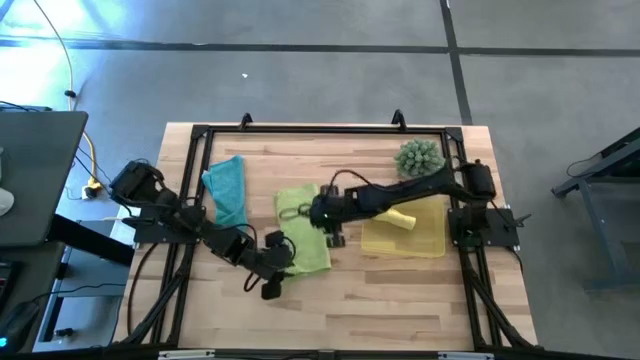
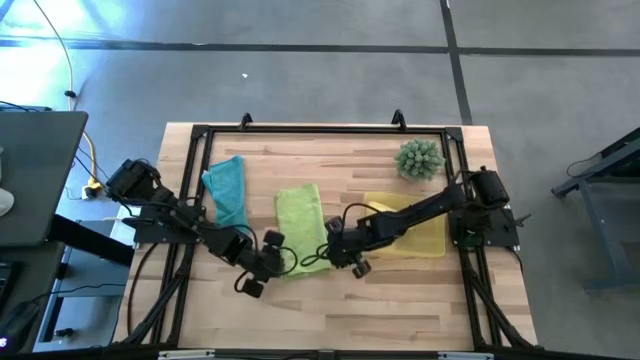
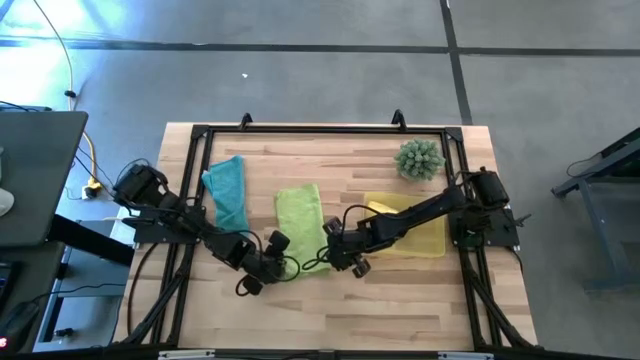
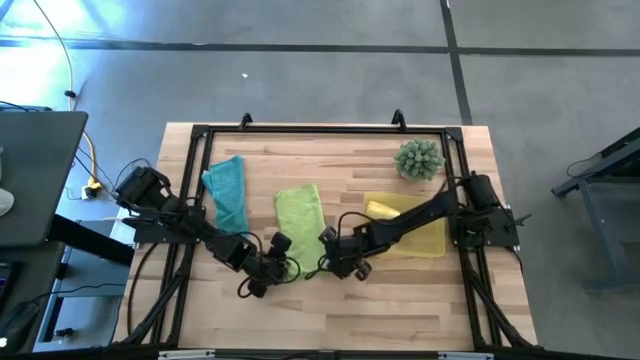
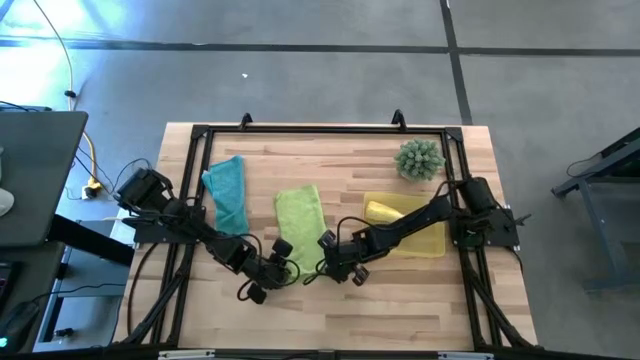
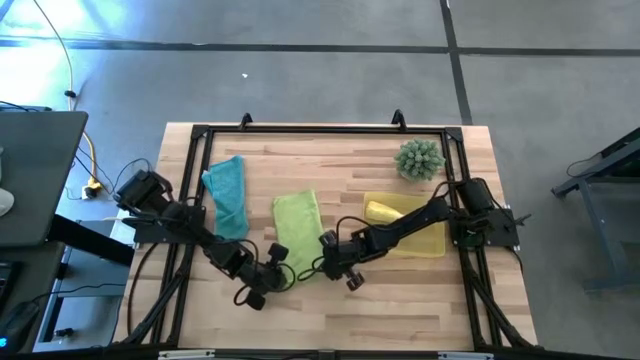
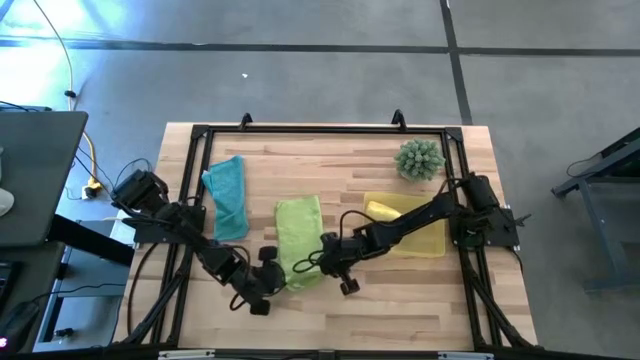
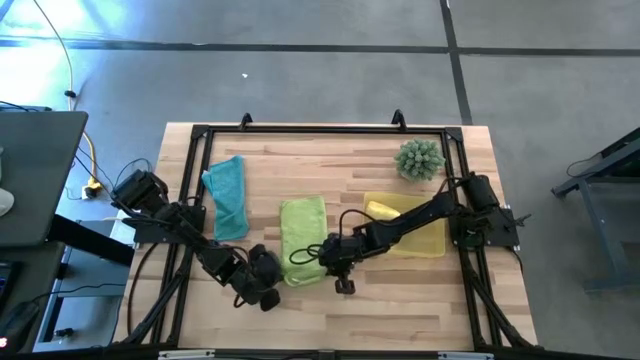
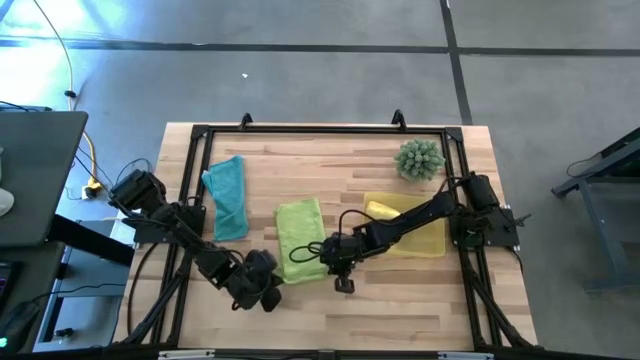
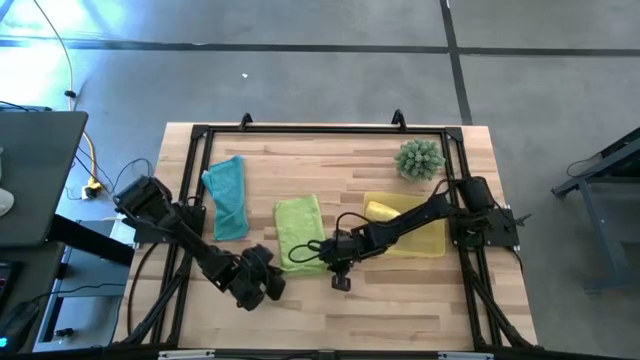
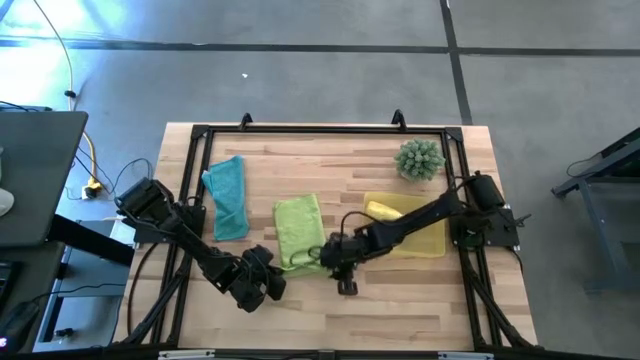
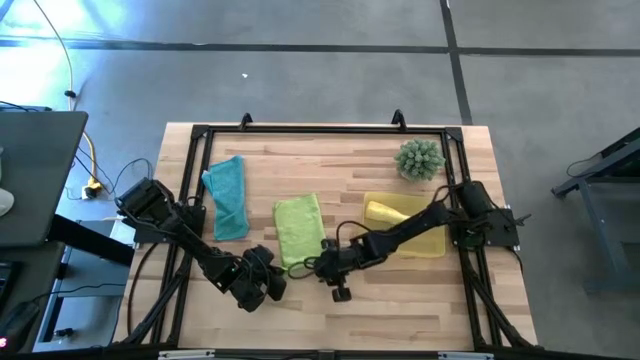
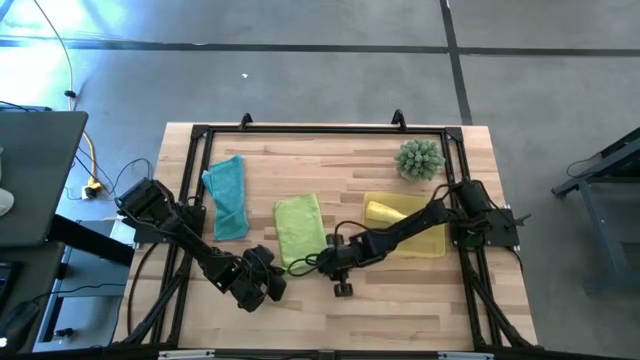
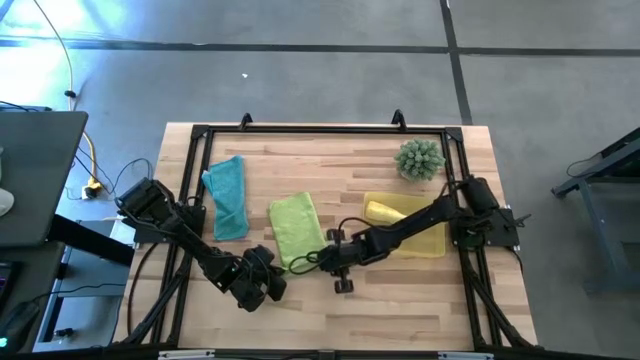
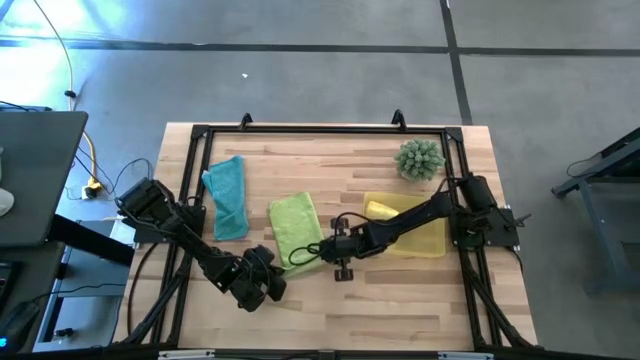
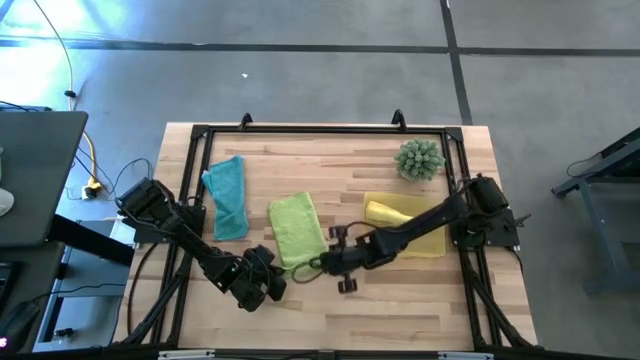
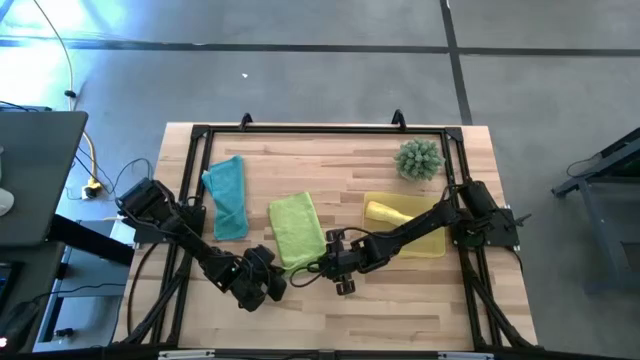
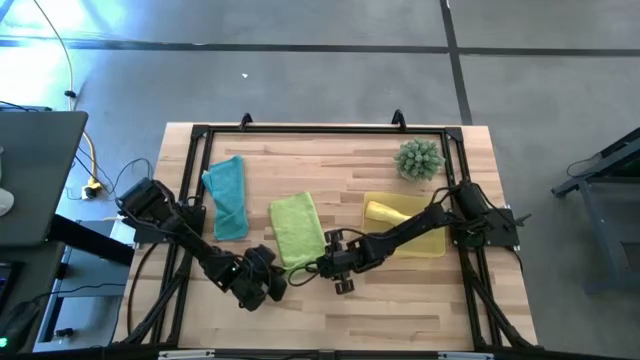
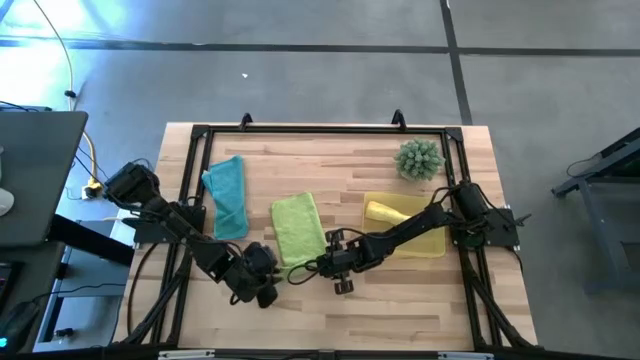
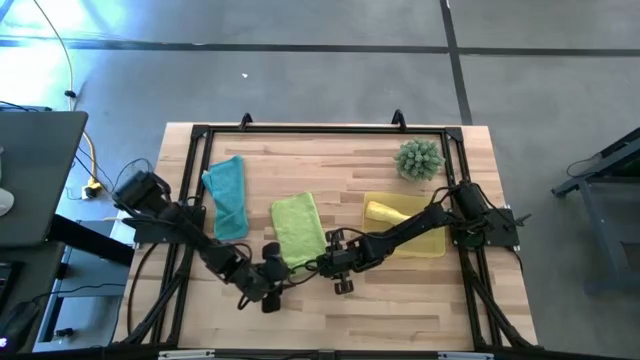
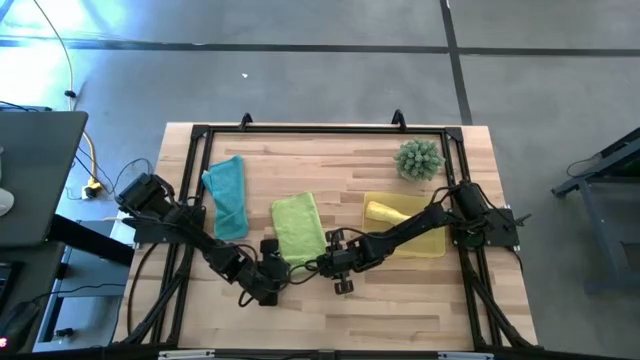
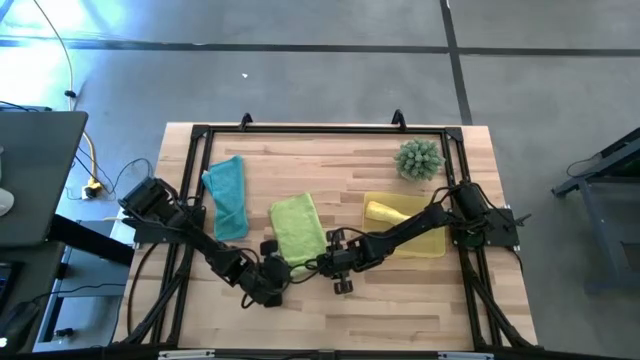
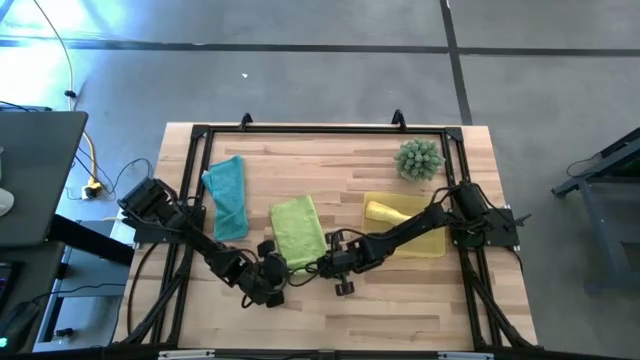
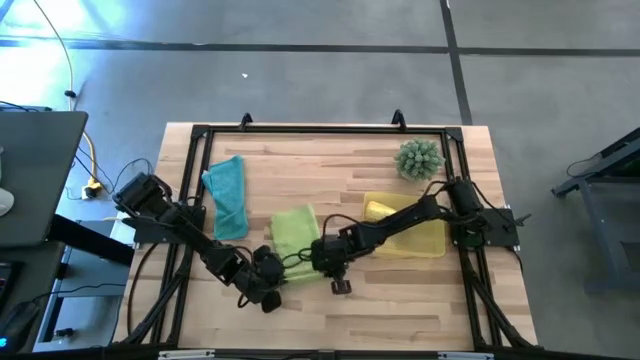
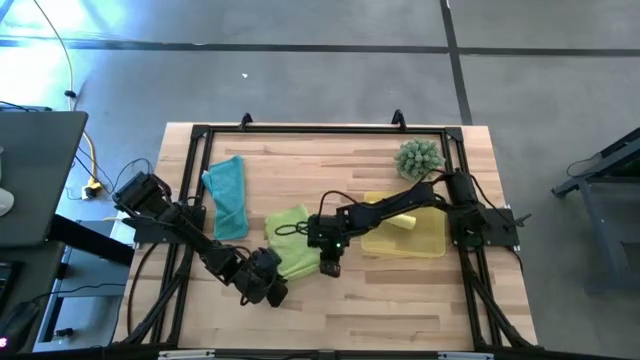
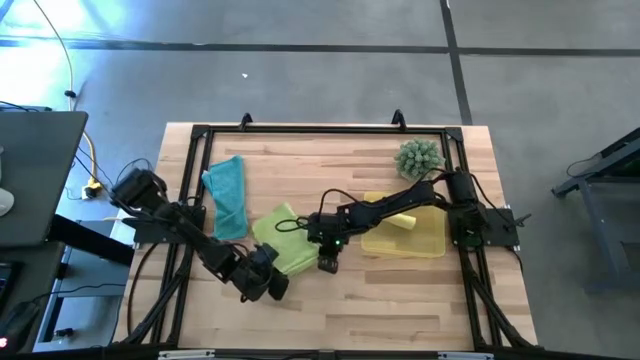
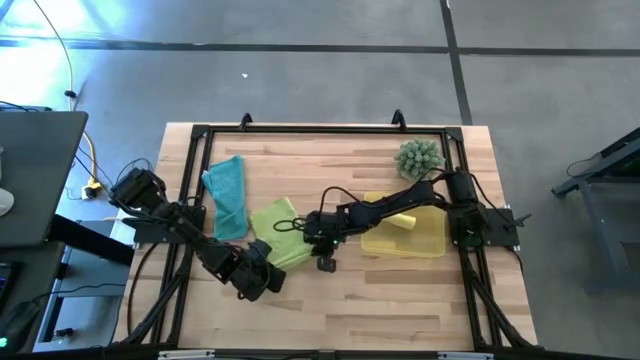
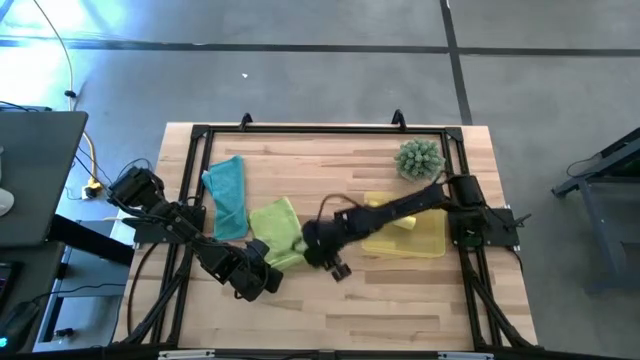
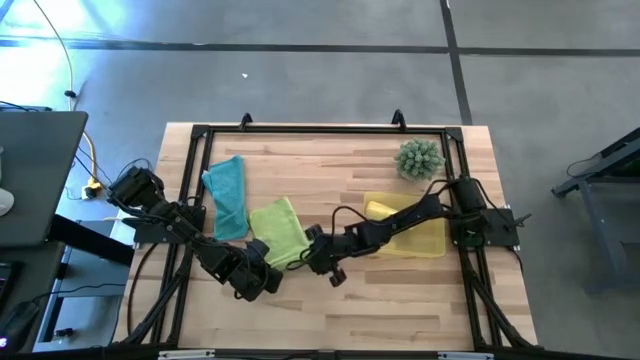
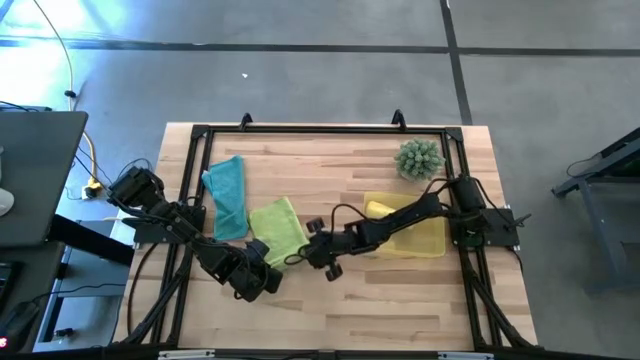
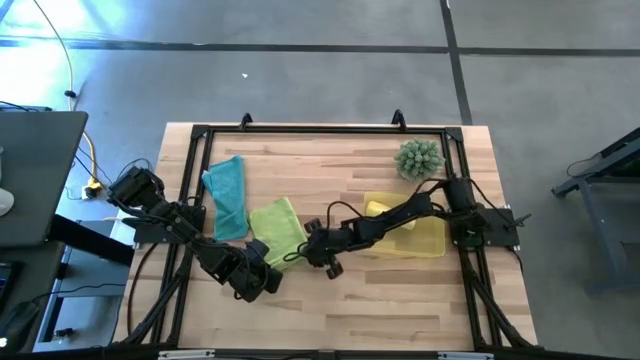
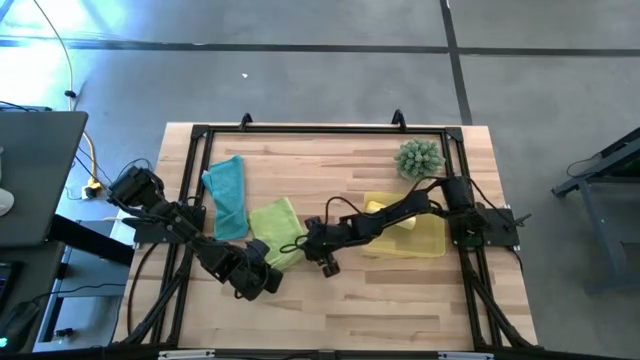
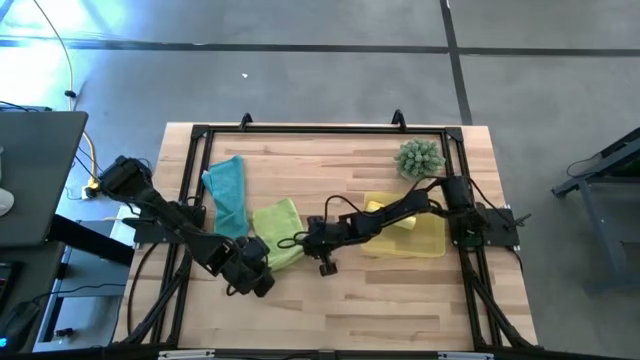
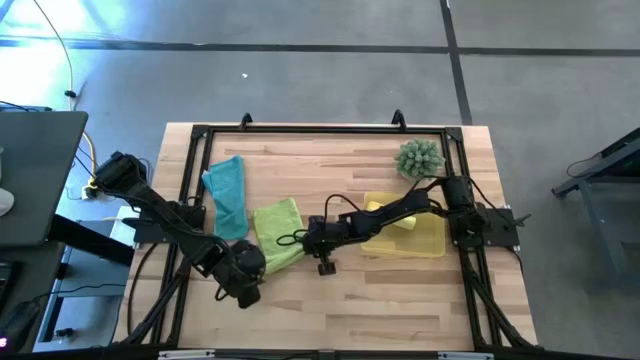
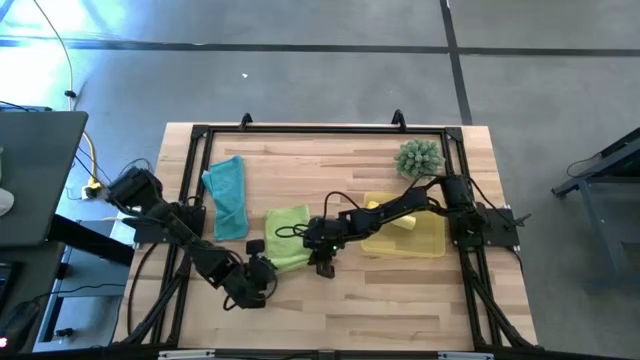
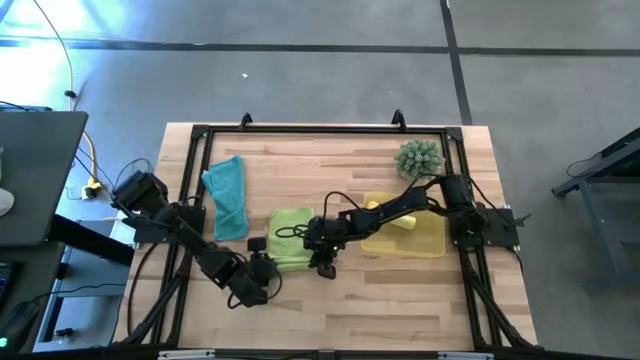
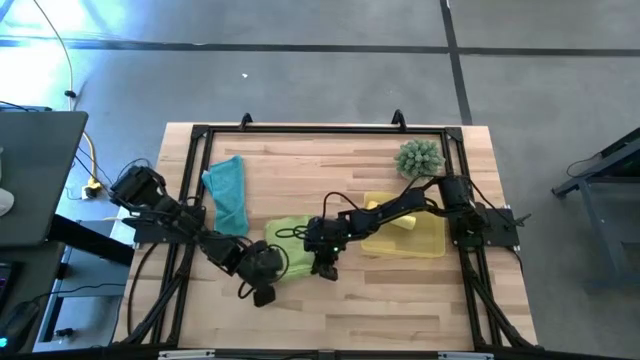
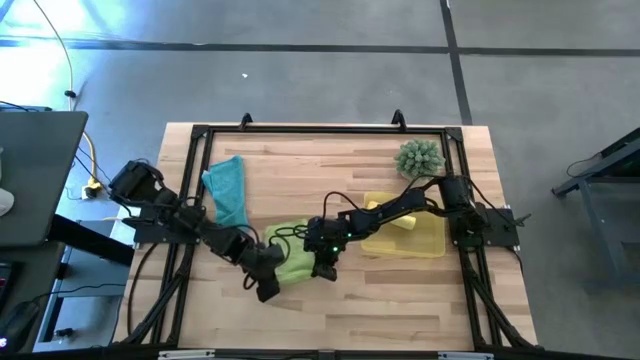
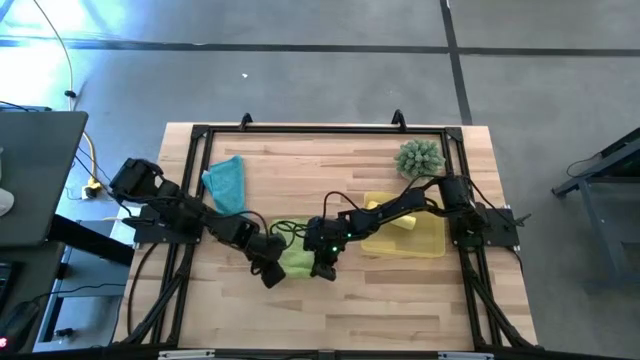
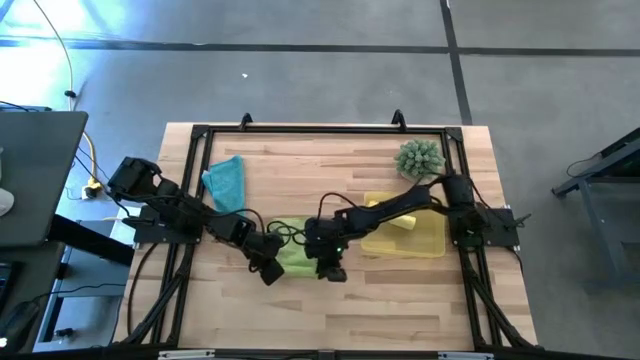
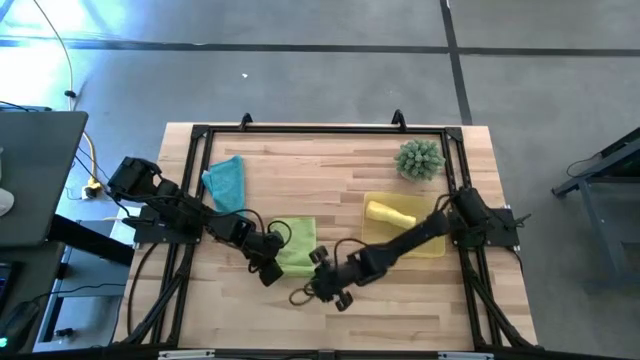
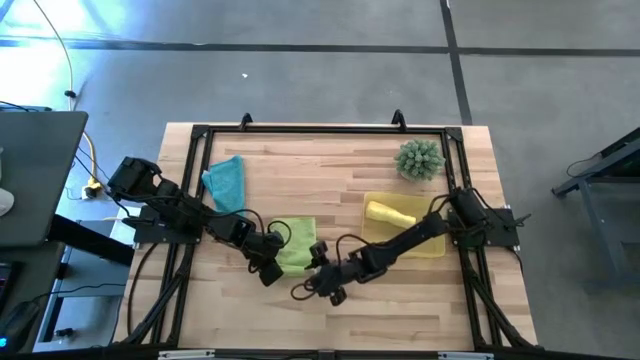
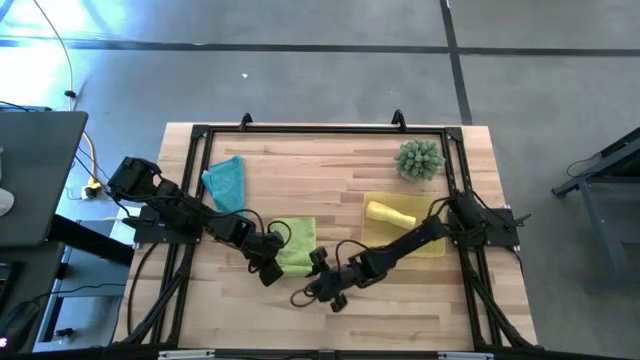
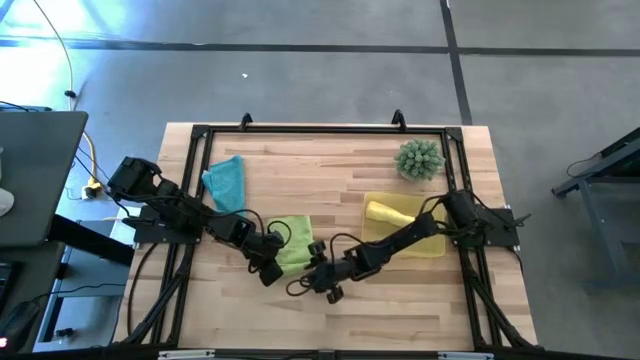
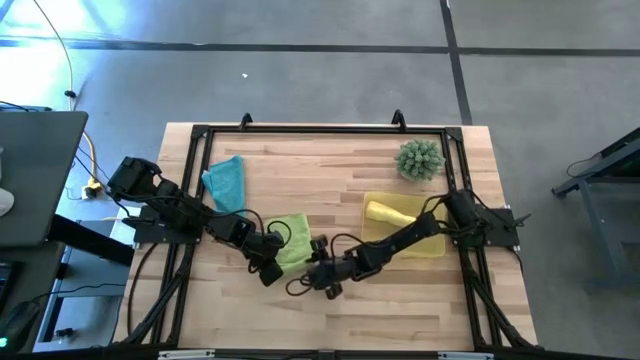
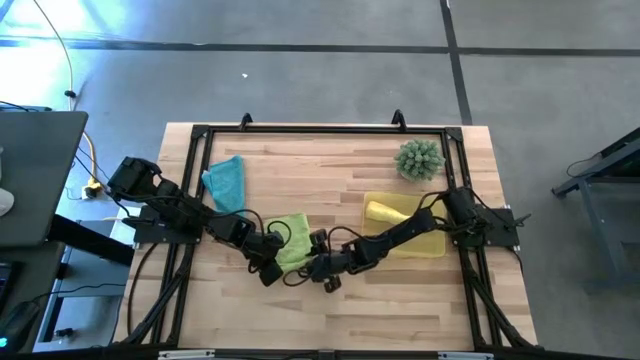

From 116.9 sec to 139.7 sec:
Task: Roll microfiber towels into tight, uniform cylinder then place into a basket
Roll the green microfiber towel
